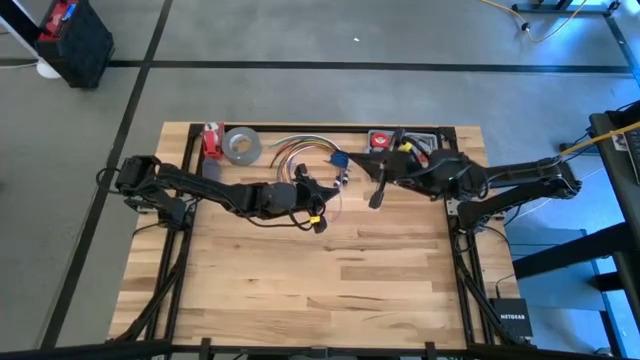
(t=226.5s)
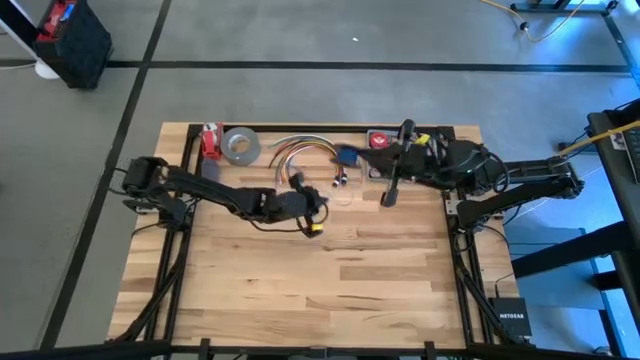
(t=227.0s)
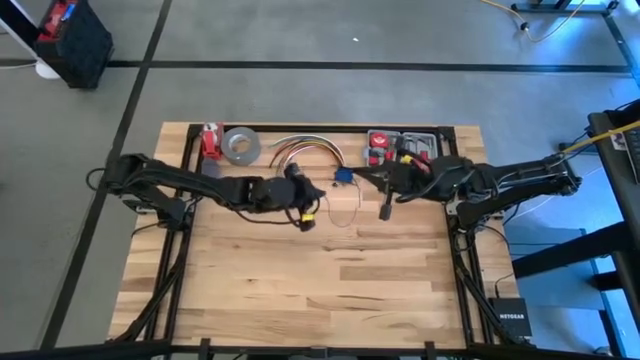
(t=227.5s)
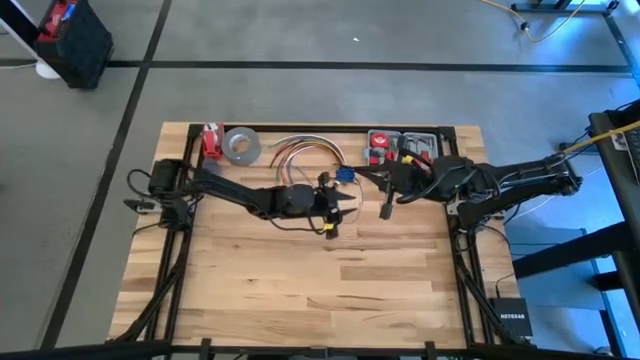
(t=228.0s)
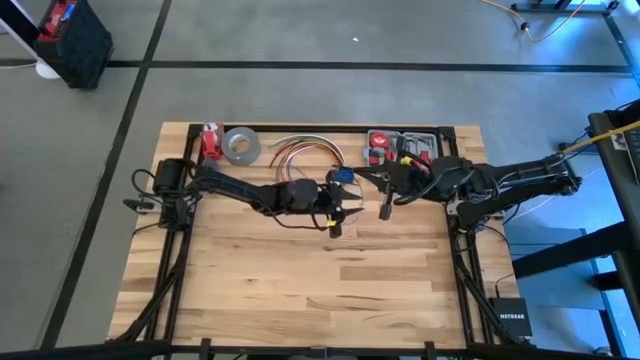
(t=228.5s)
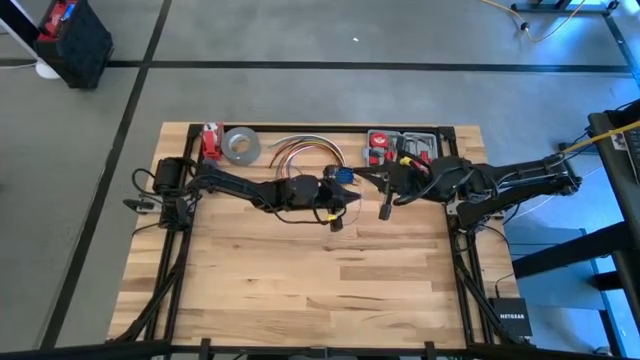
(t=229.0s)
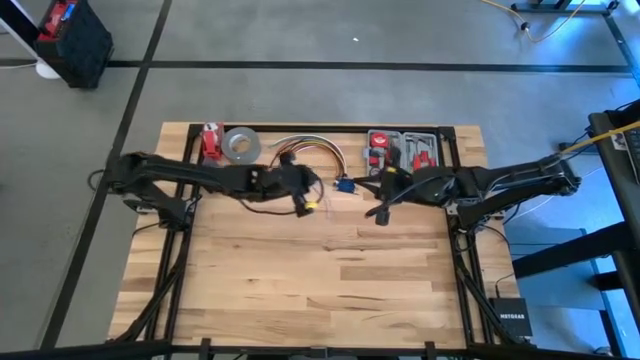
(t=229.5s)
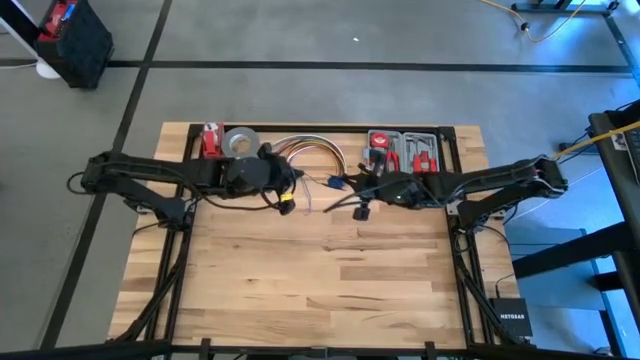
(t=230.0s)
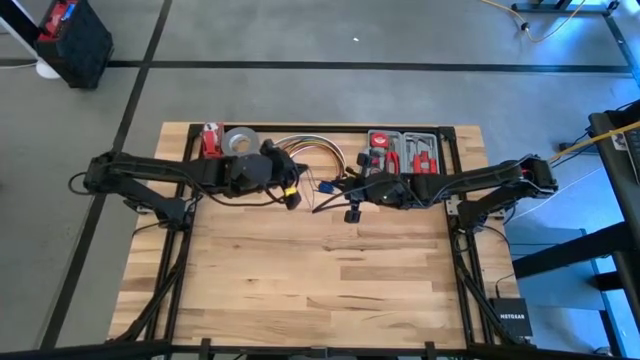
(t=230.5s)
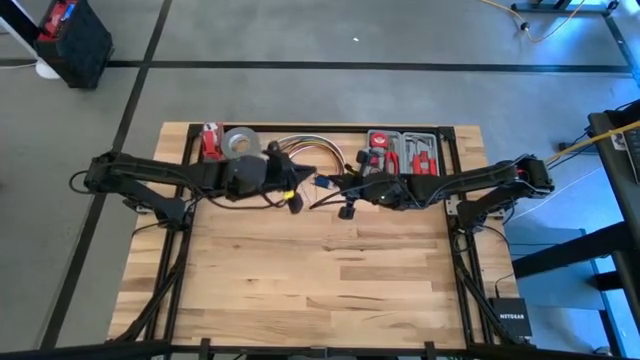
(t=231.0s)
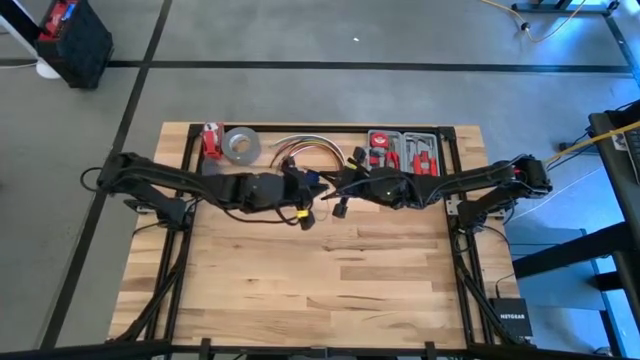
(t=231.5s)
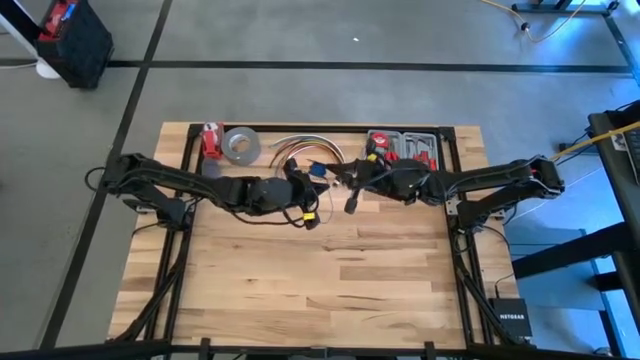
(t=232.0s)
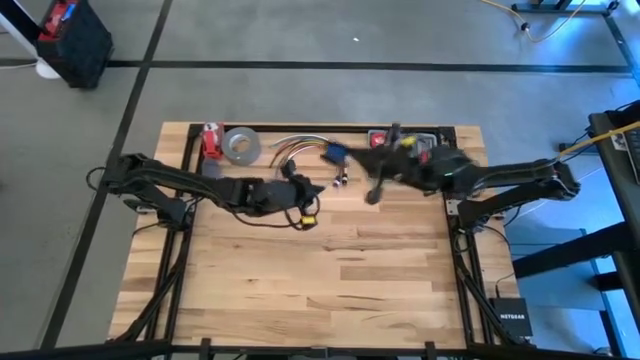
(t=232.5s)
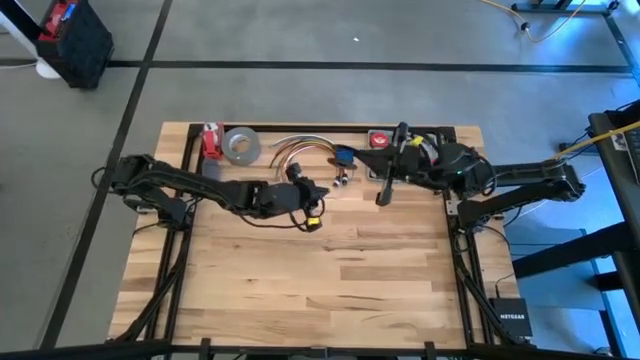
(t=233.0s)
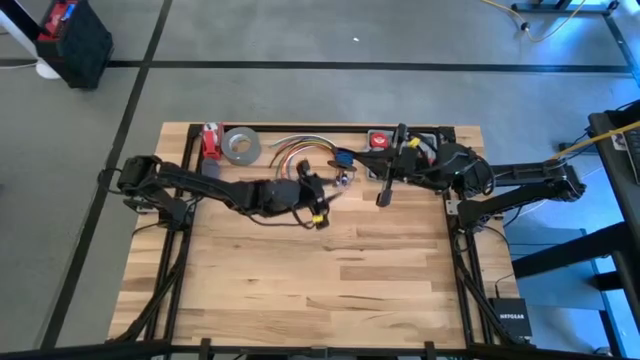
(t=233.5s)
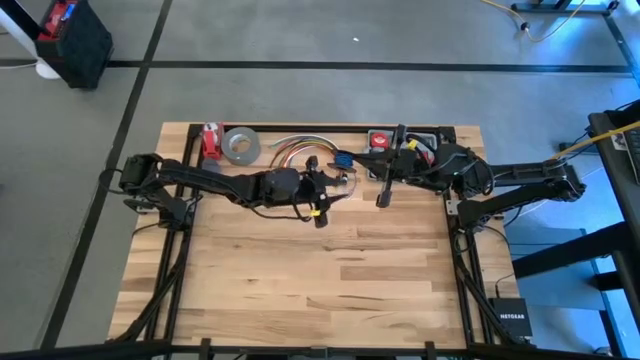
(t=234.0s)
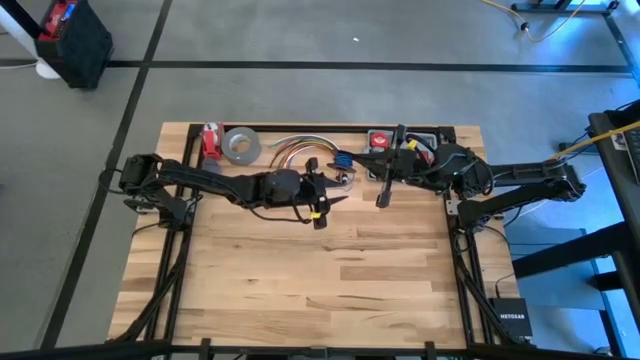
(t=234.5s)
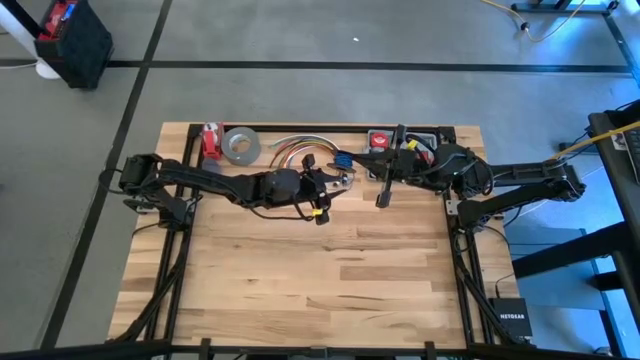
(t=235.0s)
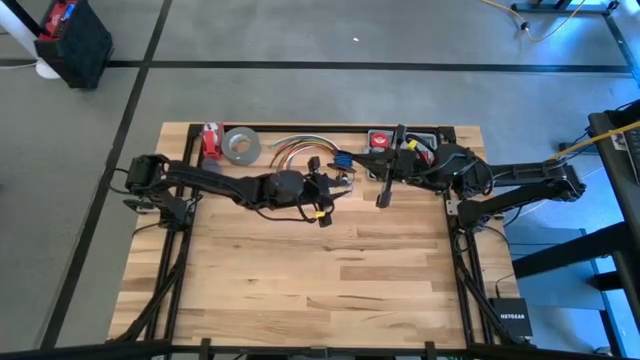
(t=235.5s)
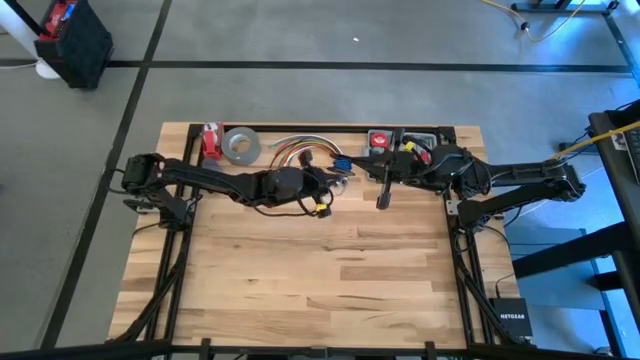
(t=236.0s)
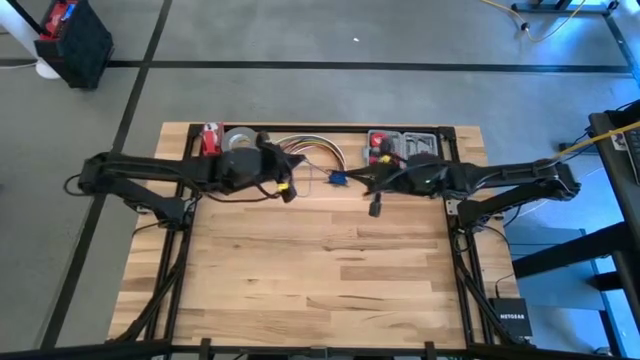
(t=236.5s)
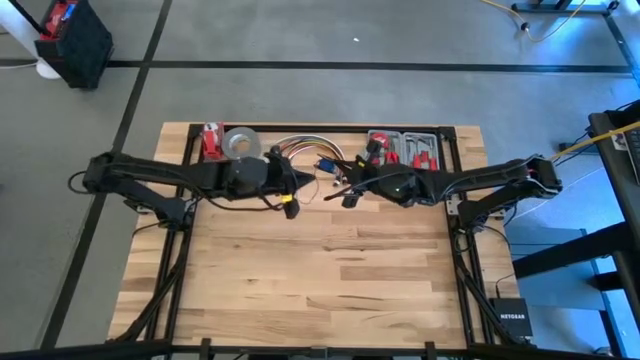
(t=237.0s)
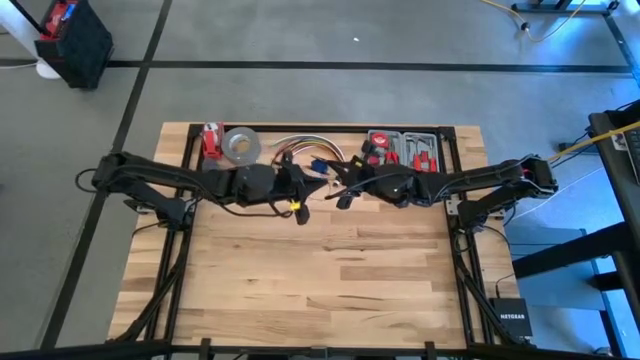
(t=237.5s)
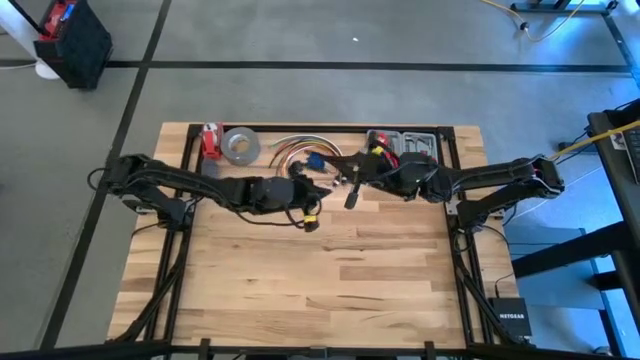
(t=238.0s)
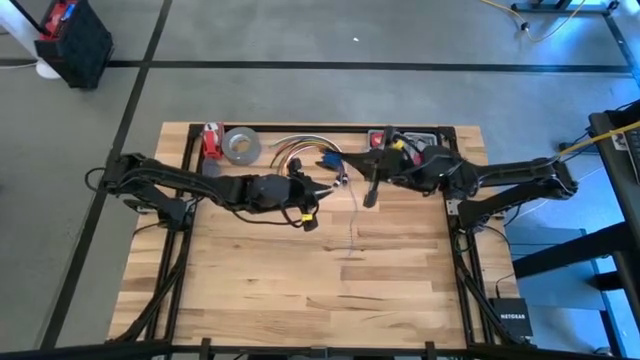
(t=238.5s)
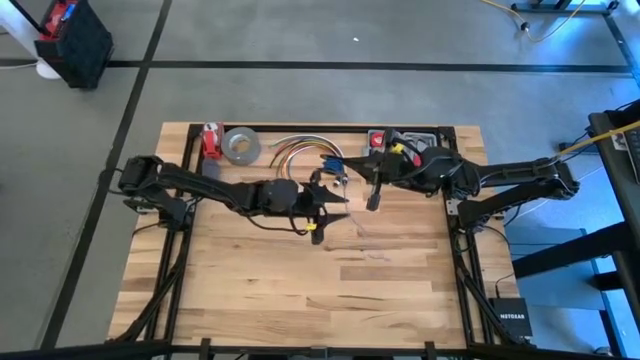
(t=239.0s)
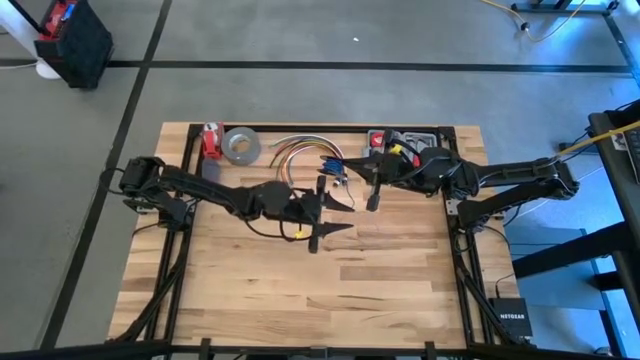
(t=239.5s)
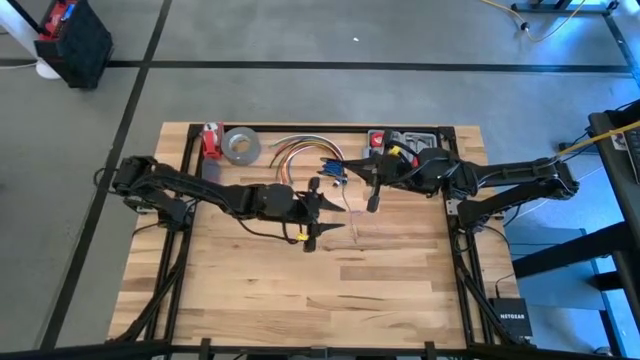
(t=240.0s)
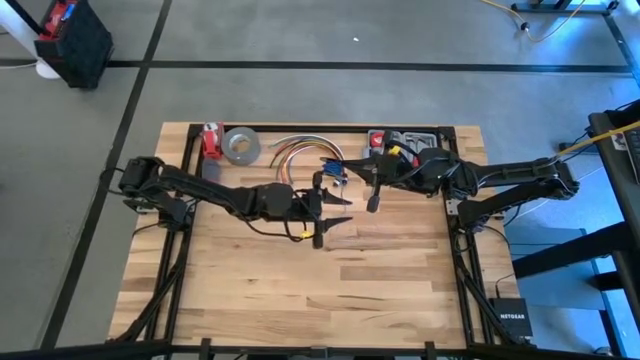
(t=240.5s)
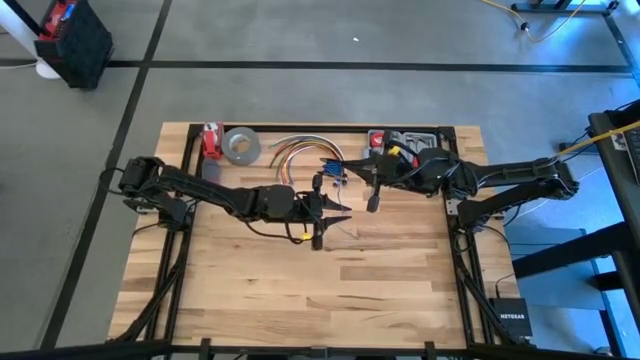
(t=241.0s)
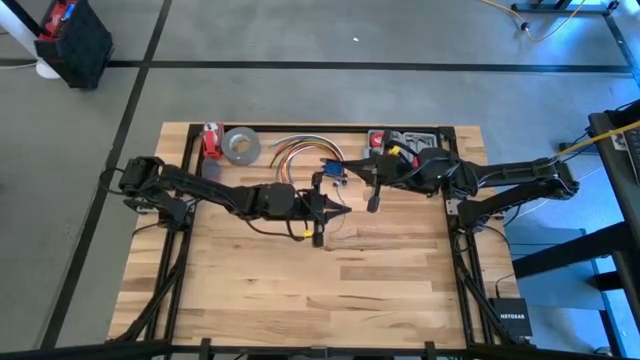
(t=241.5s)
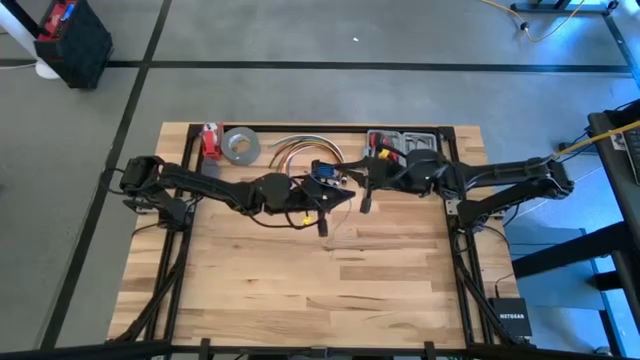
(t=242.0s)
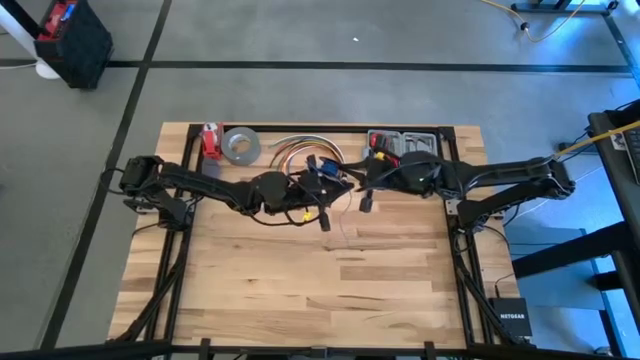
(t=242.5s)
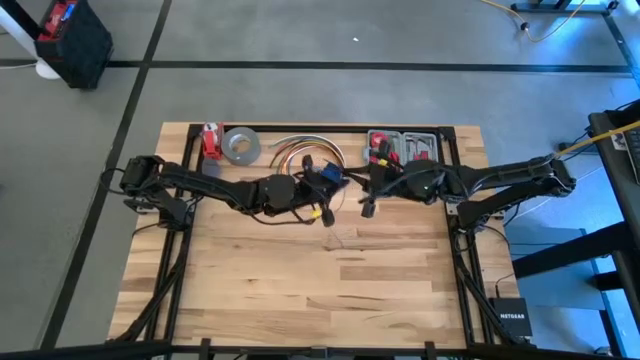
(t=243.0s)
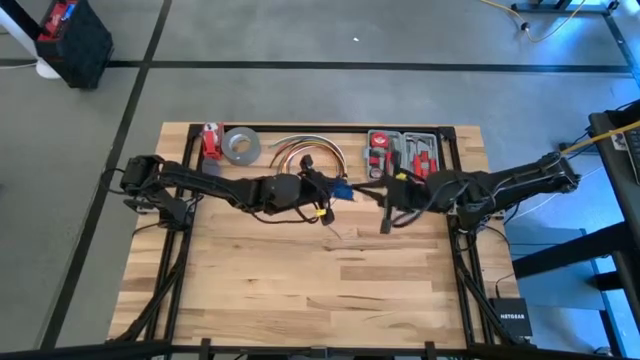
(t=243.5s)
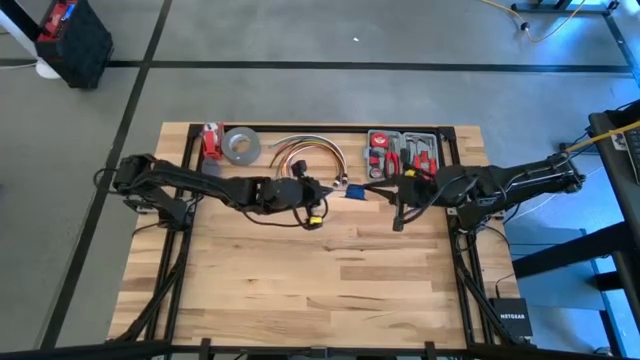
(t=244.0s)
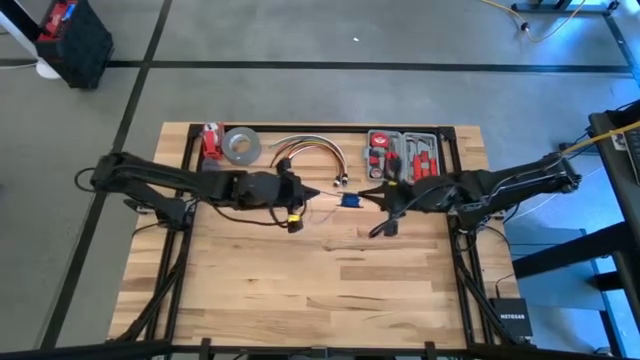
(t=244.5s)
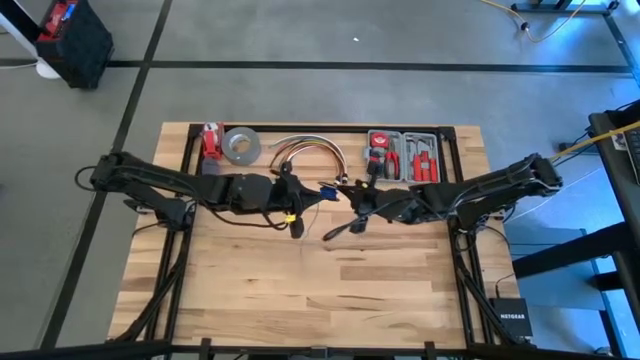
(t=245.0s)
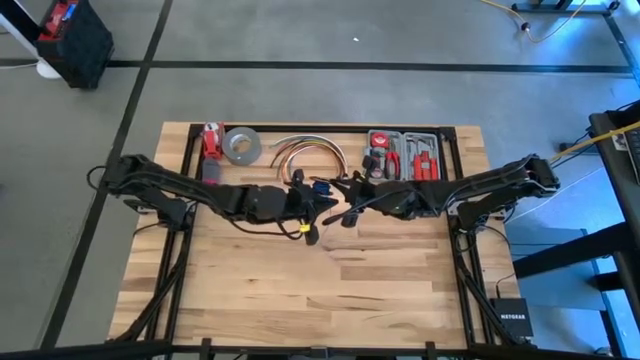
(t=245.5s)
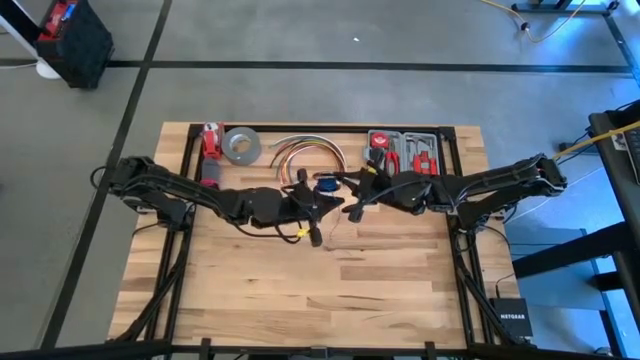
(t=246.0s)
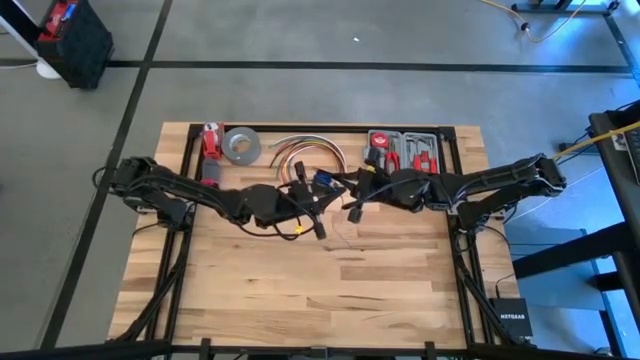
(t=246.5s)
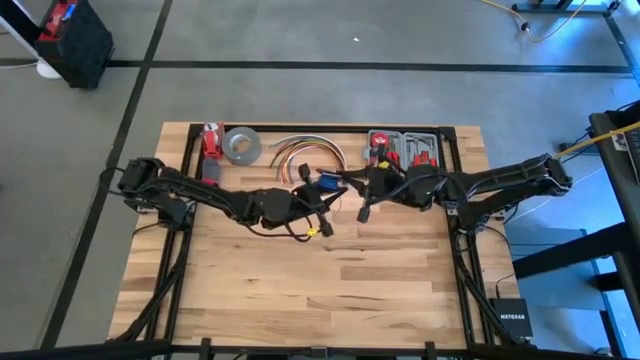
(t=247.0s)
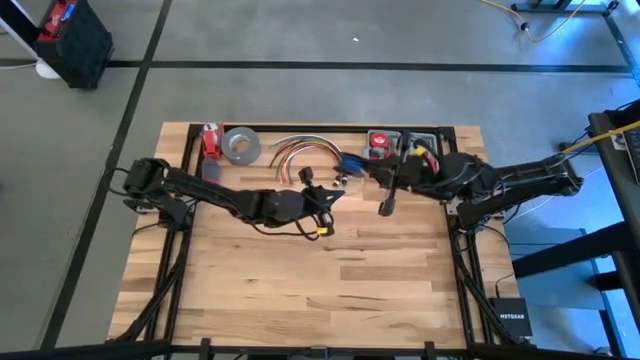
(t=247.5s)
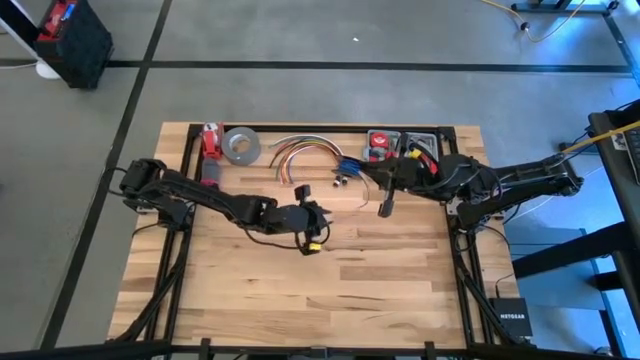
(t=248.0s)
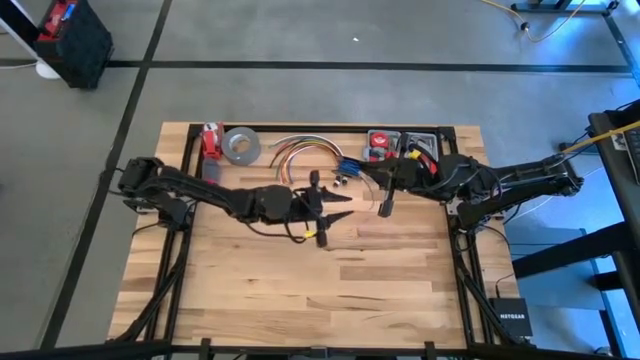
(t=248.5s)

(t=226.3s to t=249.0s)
Task: Coil cords
Coil the blue wire on the black spool

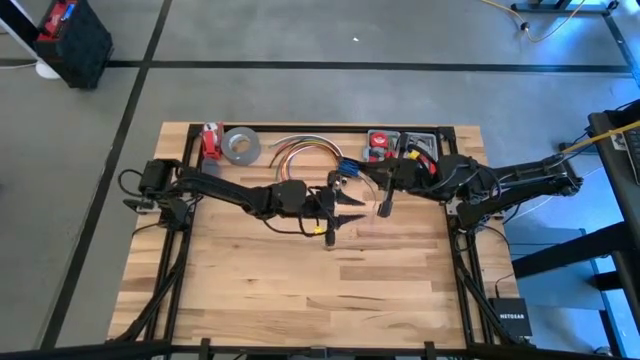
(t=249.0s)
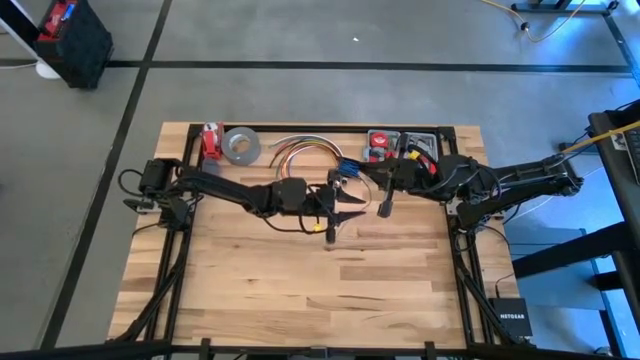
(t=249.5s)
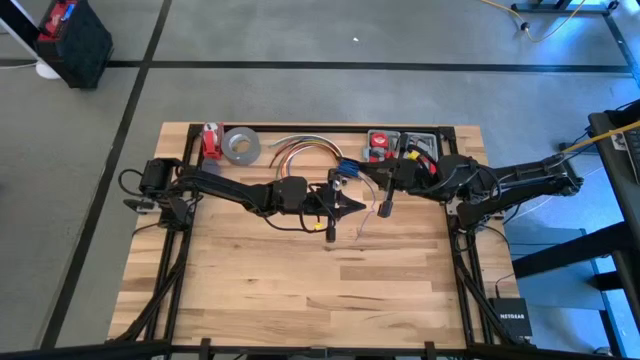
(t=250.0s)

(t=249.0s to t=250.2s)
Coil the blue wire on the black spool
